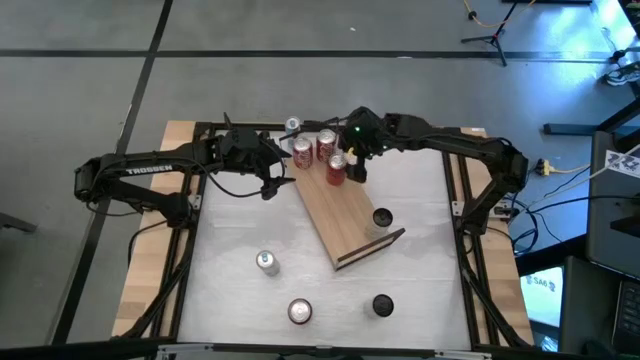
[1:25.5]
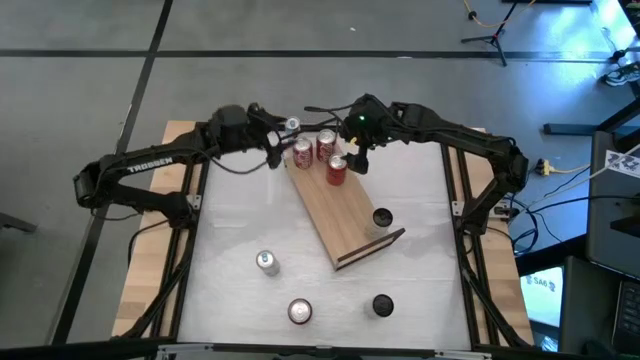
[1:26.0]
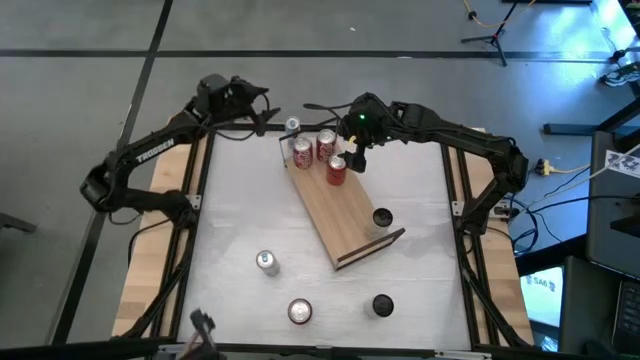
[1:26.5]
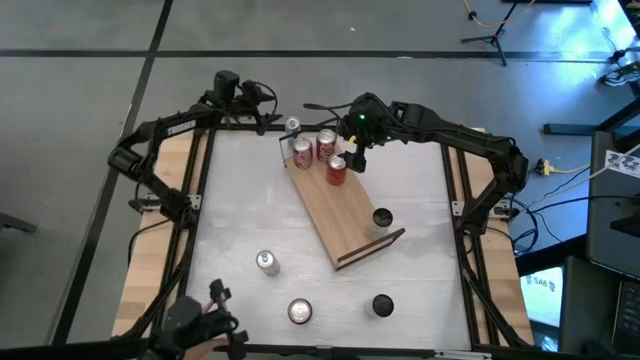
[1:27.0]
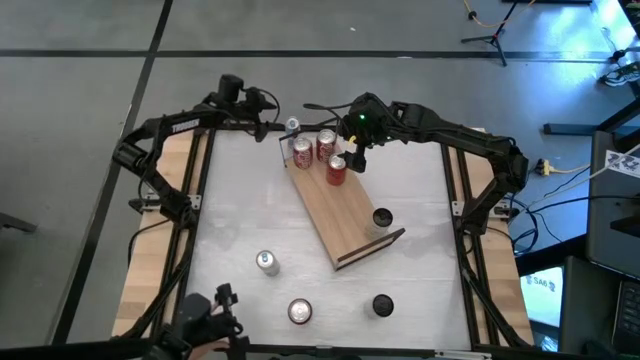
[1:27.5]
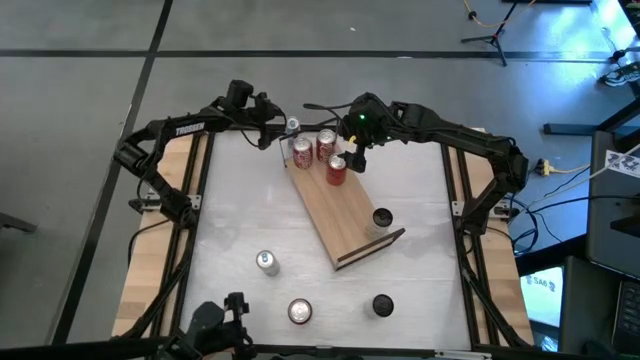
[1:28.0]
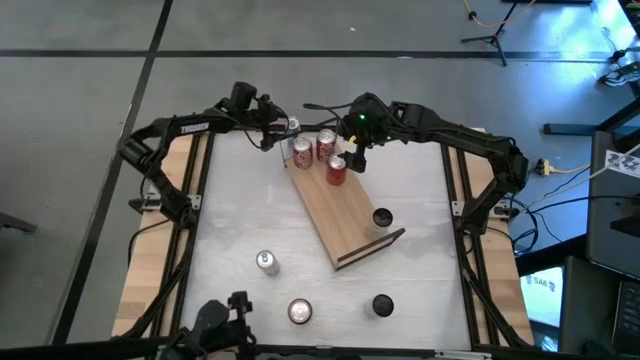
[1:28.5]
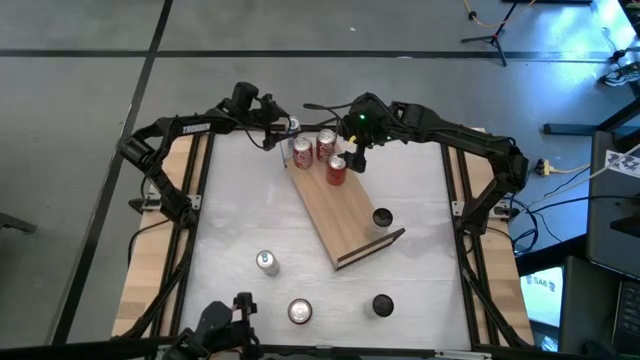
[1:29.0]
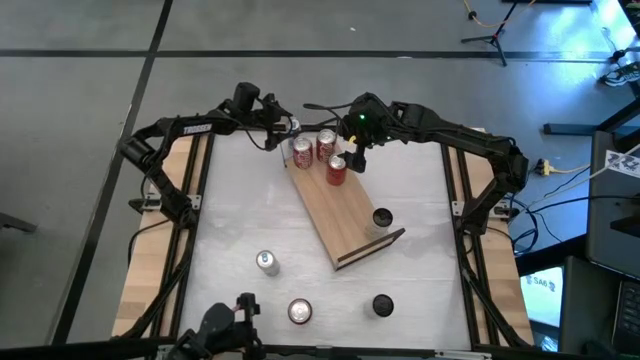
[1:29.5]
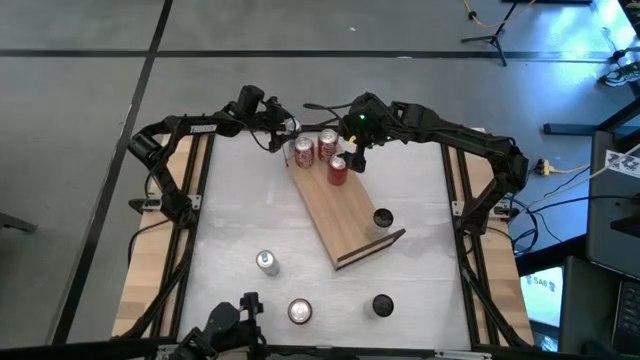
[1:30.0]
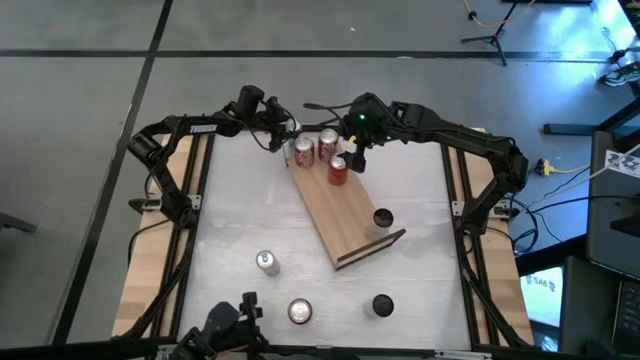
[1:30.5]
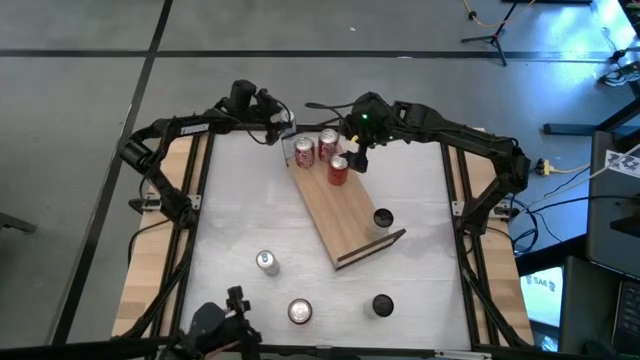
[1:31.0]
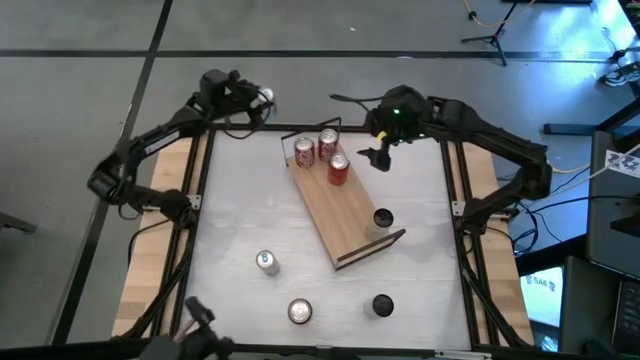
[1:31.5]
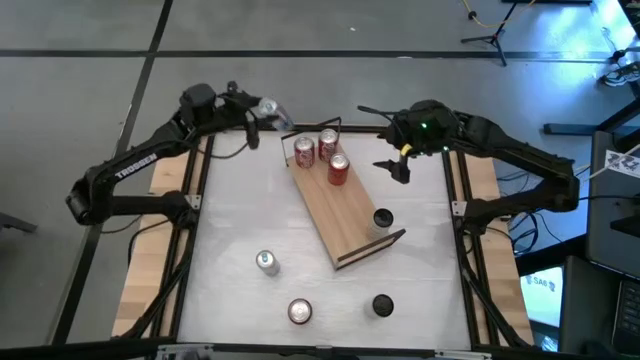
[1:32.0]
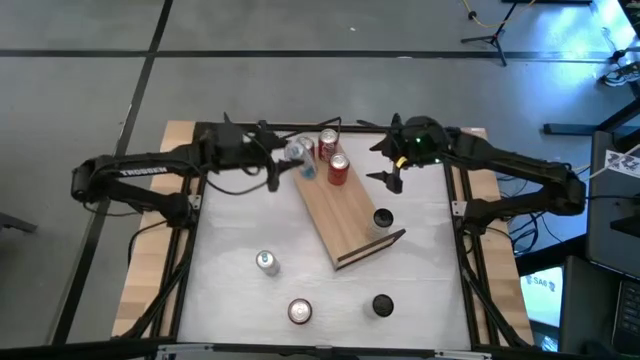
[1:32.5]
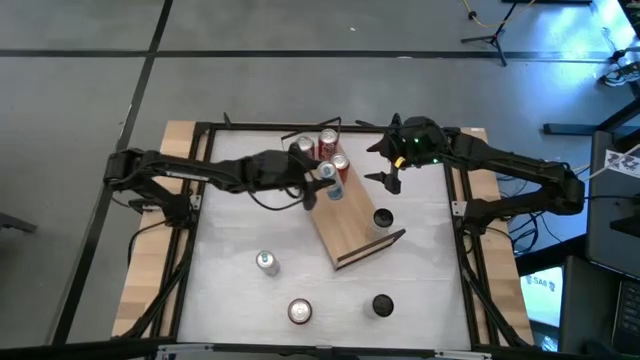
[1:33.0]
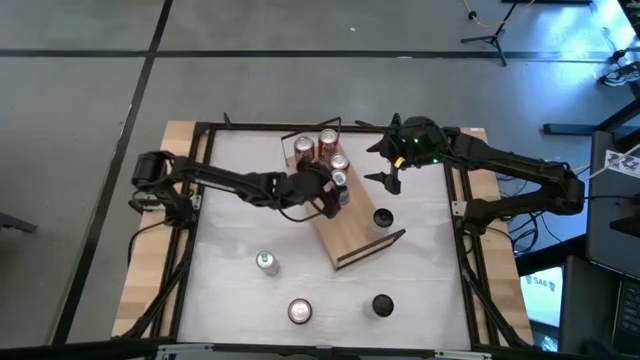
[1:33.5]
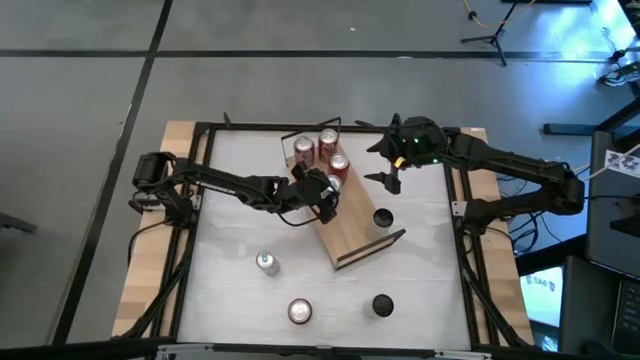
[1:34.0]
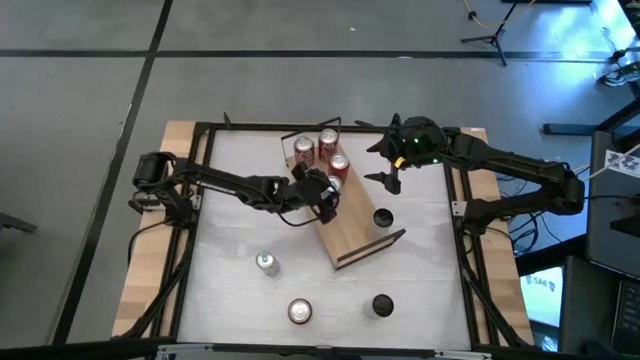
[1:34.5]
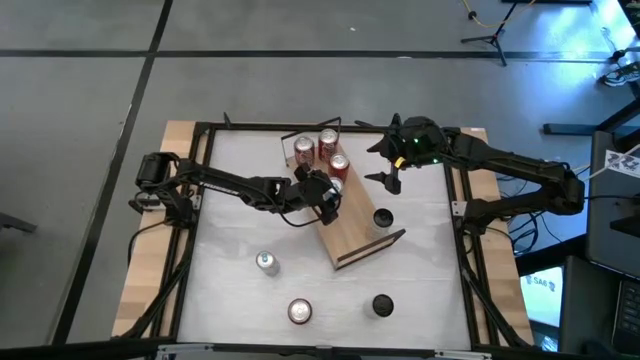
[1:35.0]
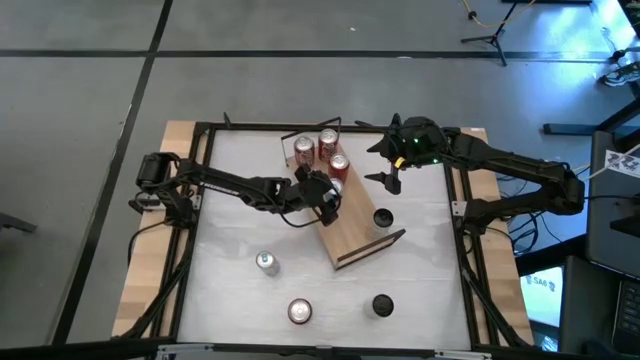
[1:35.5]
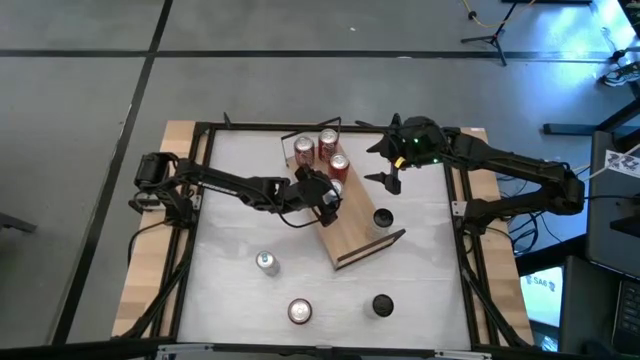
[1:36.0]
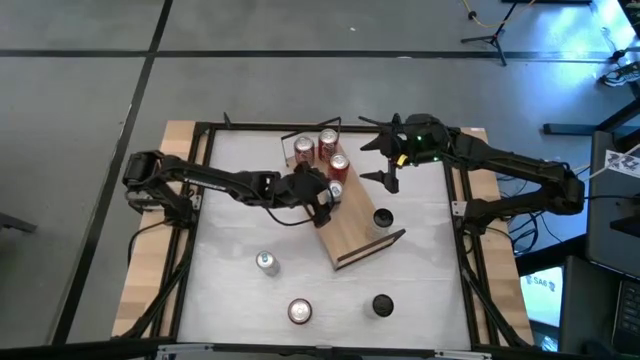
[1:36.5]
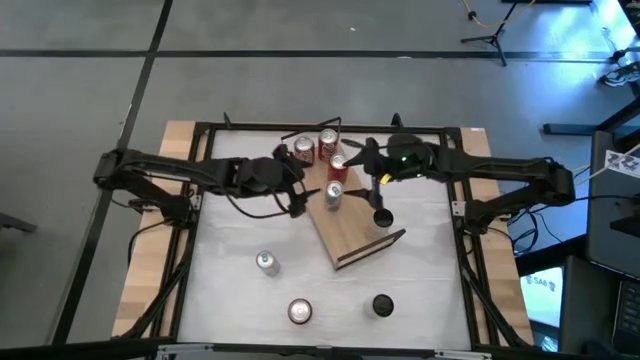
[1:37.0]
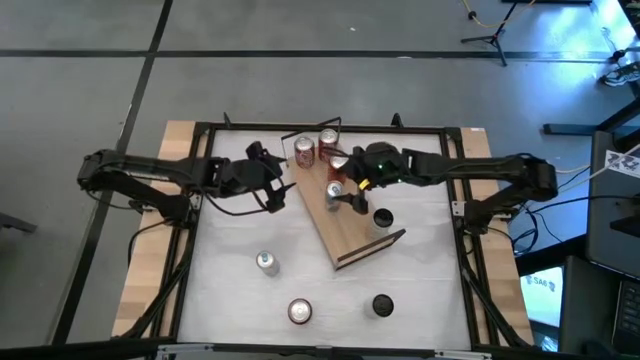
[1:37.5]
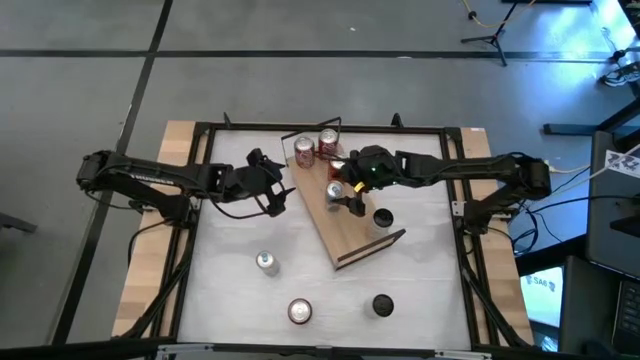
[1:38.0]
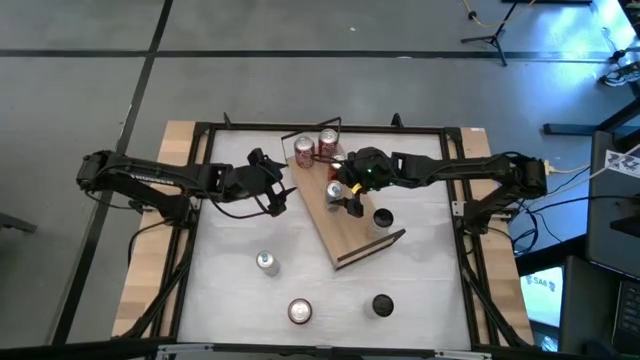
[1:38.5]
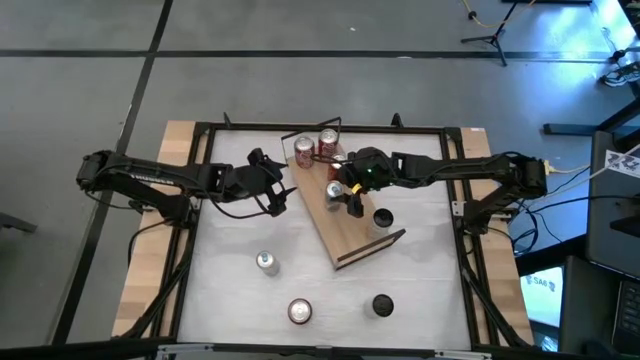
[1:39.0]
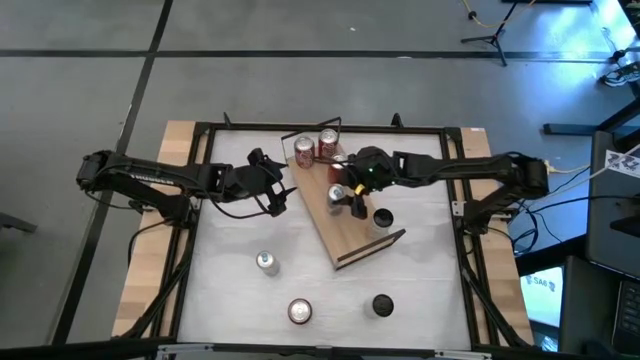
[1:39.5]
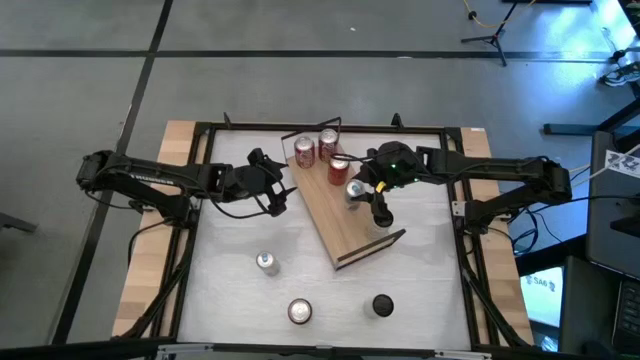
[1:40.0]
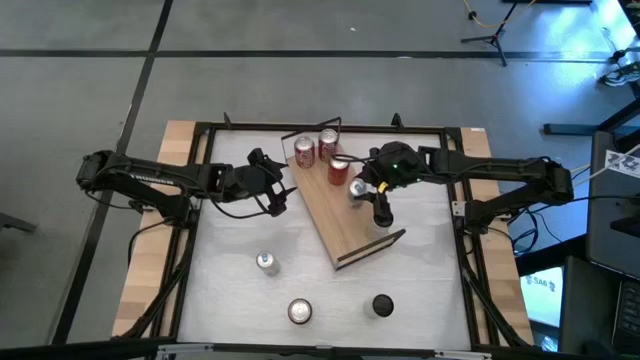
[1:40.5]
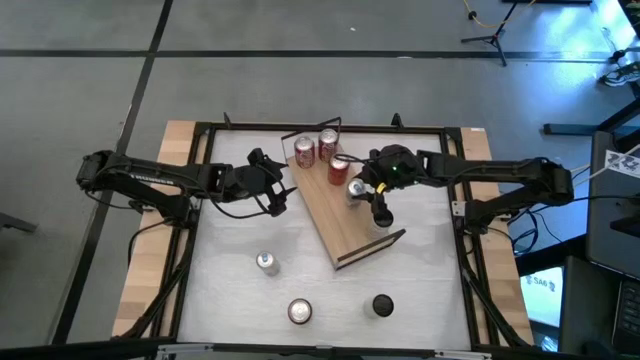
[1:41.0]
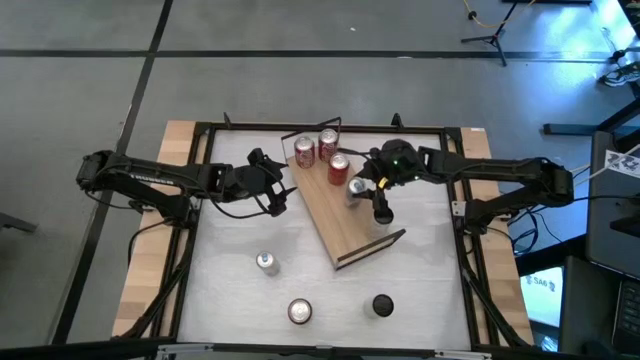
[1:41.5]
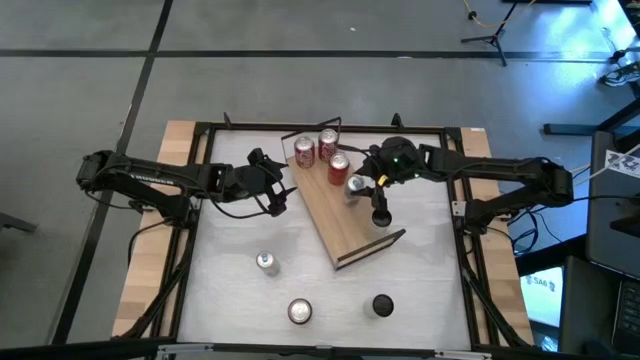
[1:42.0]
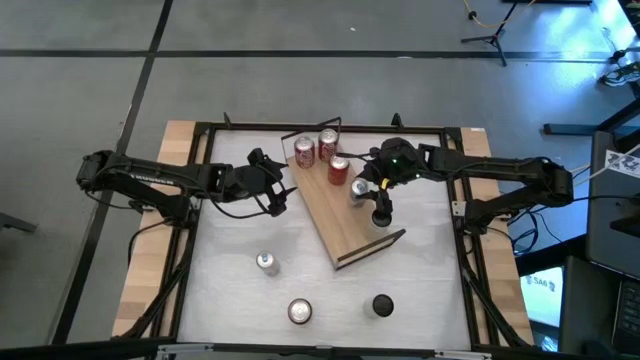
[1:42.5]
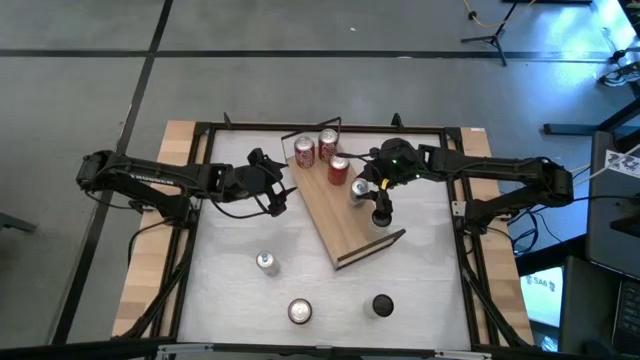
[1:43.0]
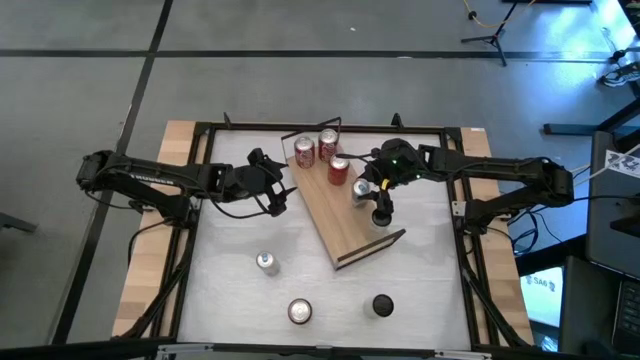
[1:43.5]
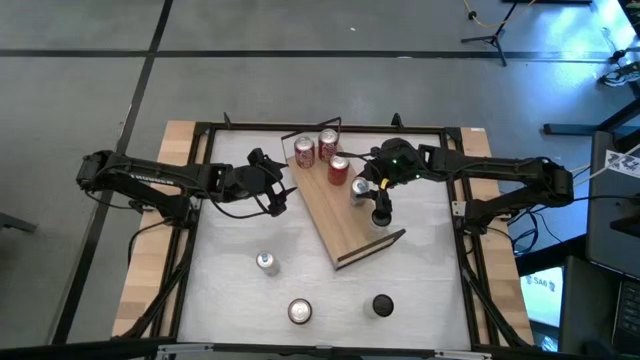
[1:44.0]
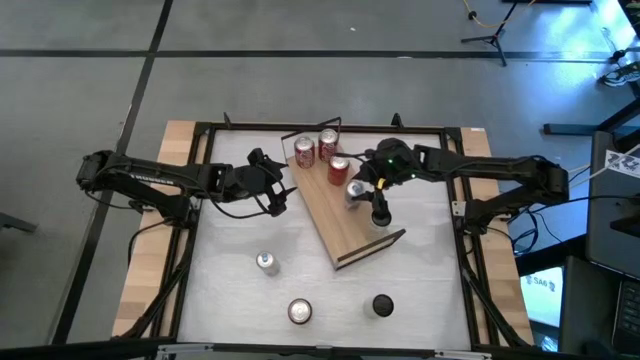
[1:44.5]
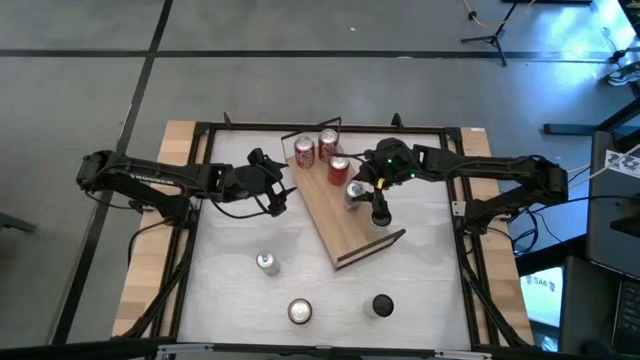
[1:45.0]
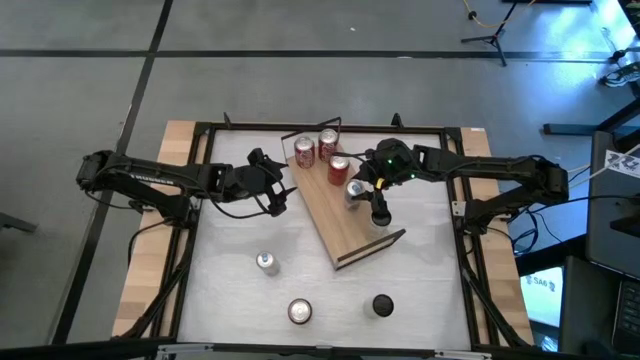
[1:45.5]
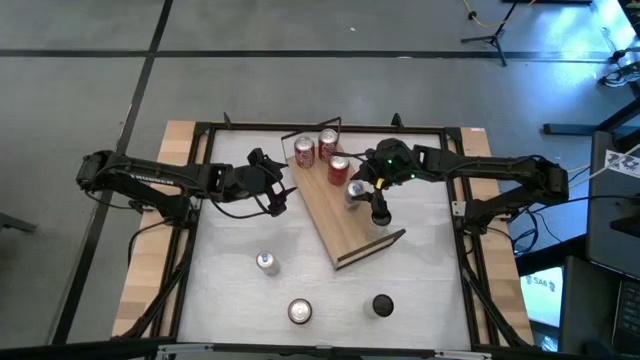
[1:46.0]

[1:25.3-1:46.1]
Task: Place canned beverage on shelf
Put the top blue soda can on the shelf

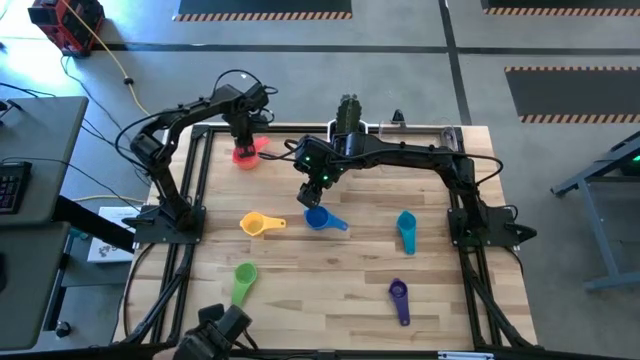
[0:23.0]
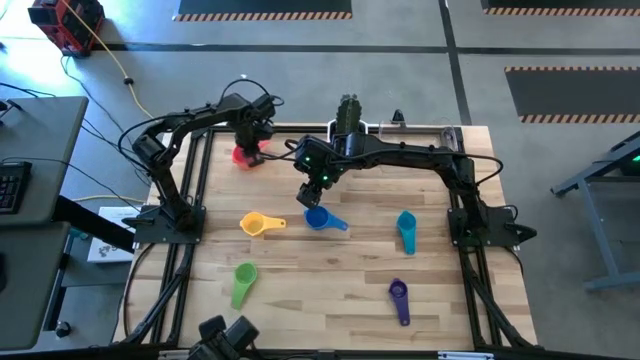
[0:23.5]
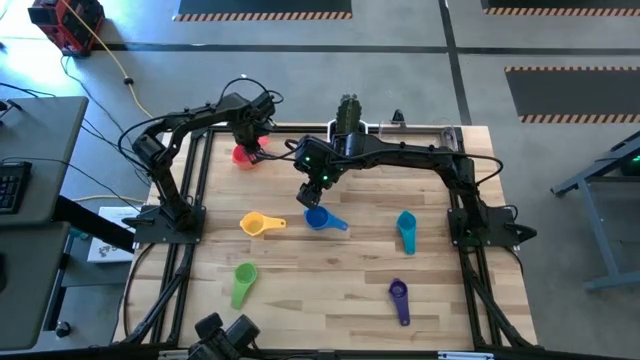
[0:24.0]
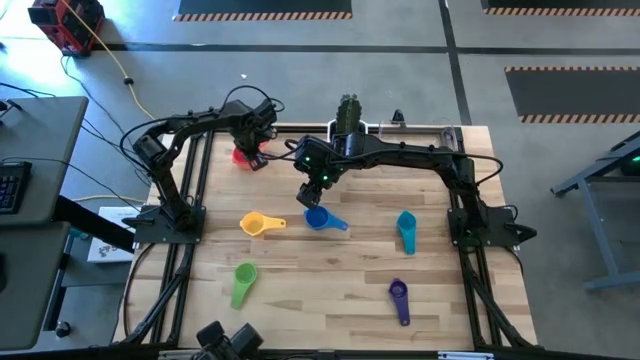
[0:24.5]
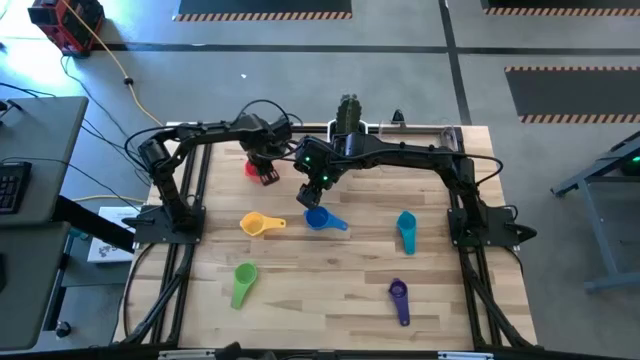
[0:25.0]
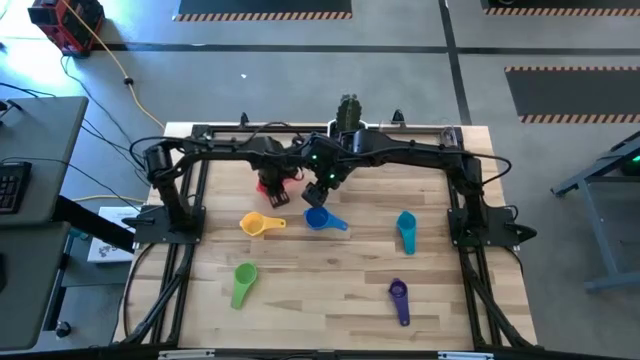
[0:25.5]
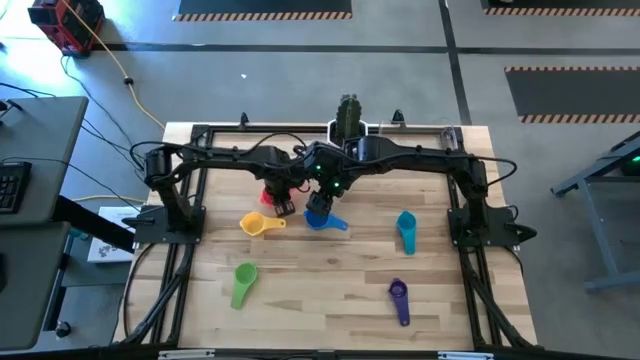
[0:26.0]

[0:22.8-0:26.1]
Task: Nest measuring cups in basket
Move the stack of measuring cups to the middle left of the table
